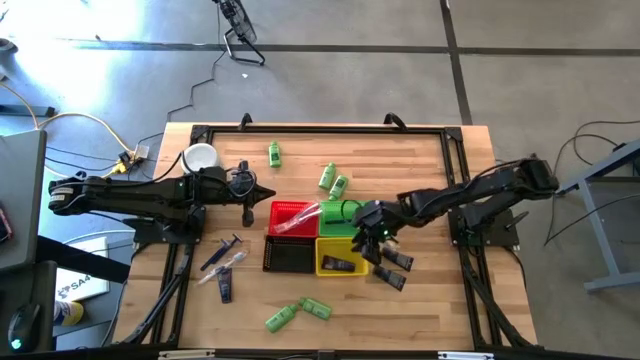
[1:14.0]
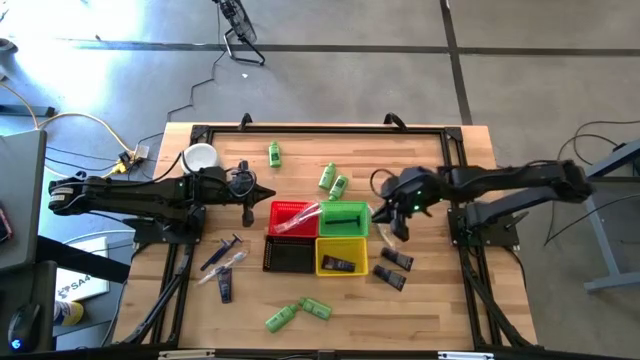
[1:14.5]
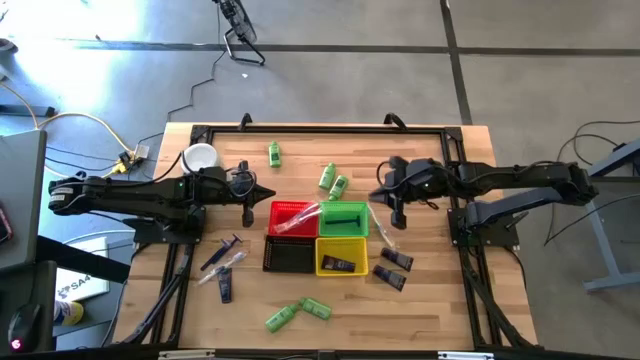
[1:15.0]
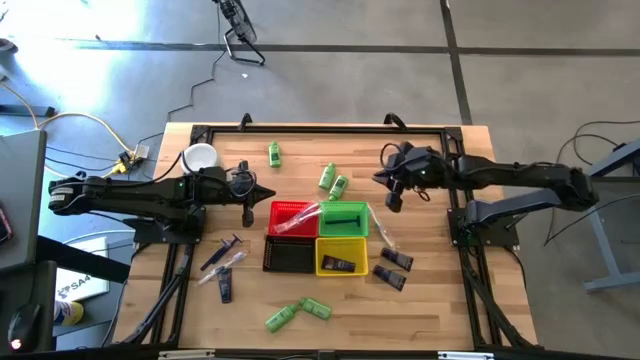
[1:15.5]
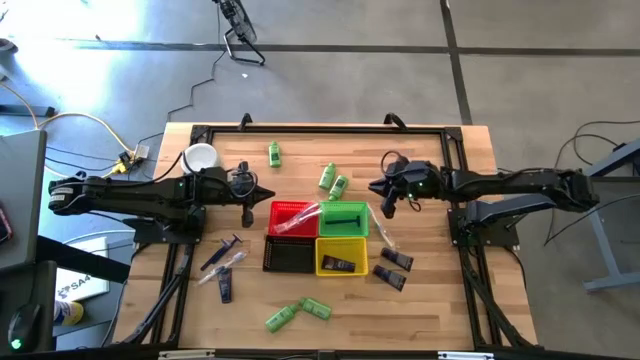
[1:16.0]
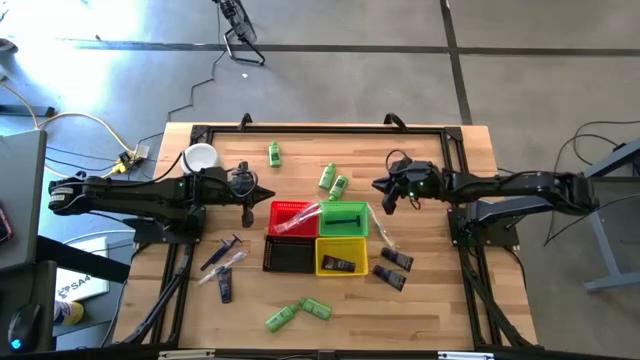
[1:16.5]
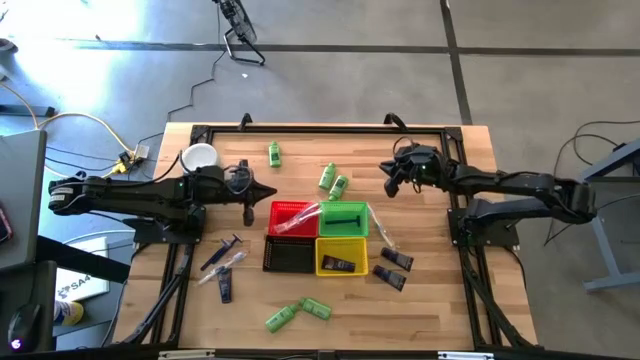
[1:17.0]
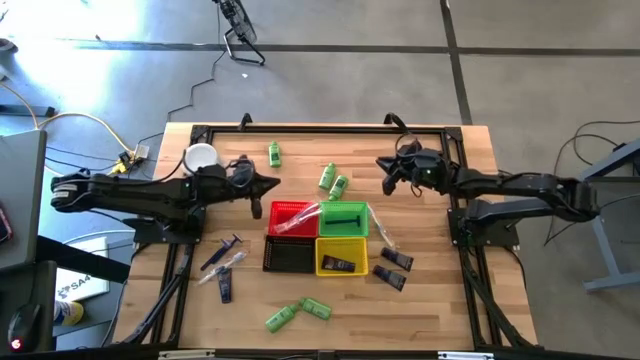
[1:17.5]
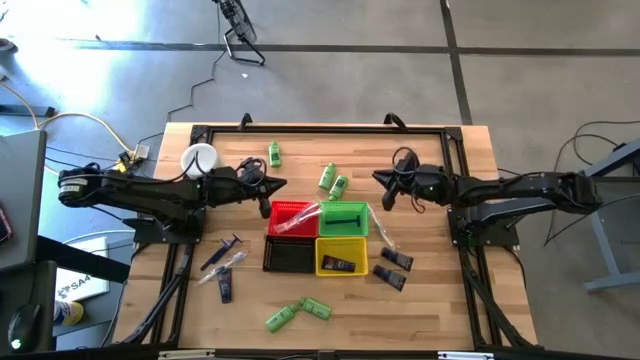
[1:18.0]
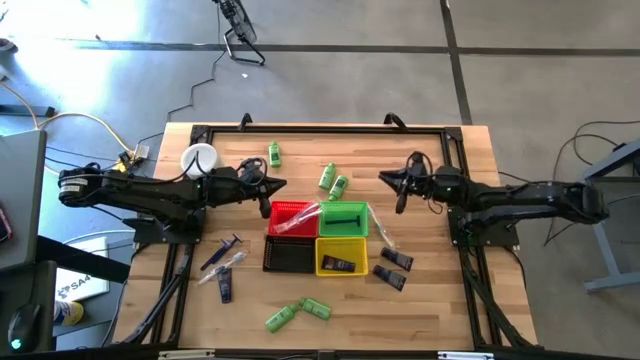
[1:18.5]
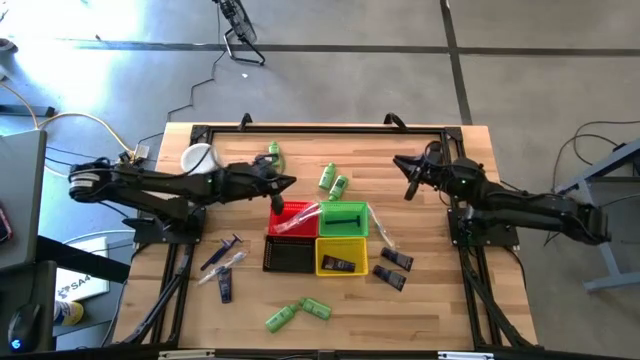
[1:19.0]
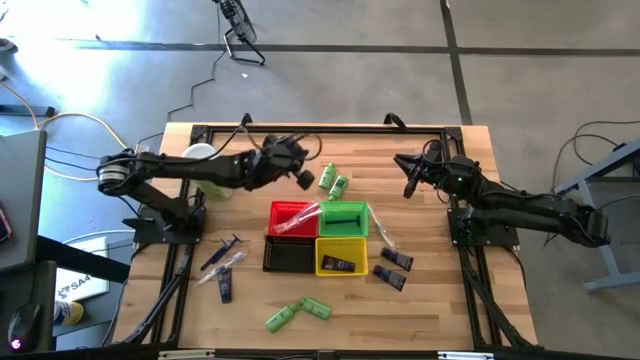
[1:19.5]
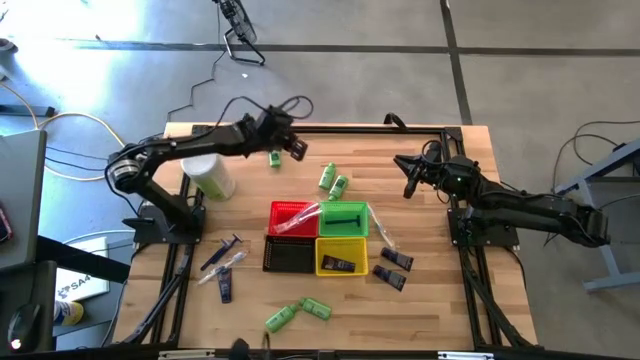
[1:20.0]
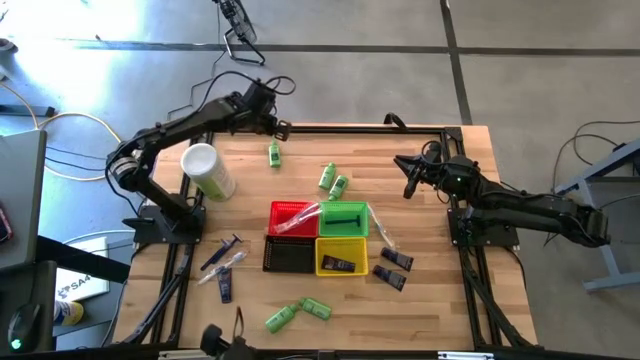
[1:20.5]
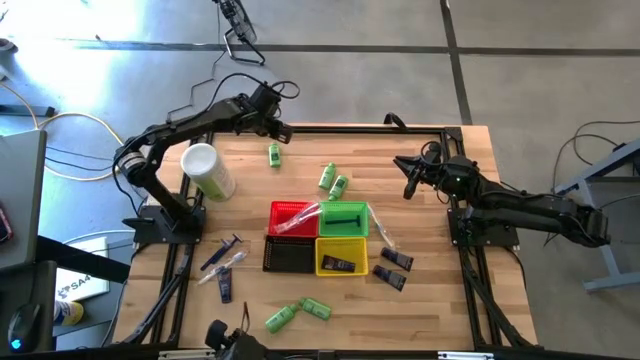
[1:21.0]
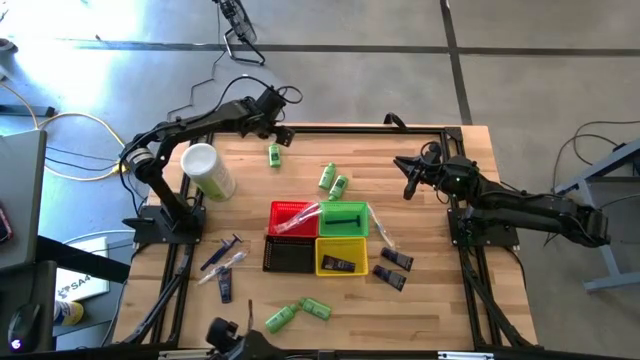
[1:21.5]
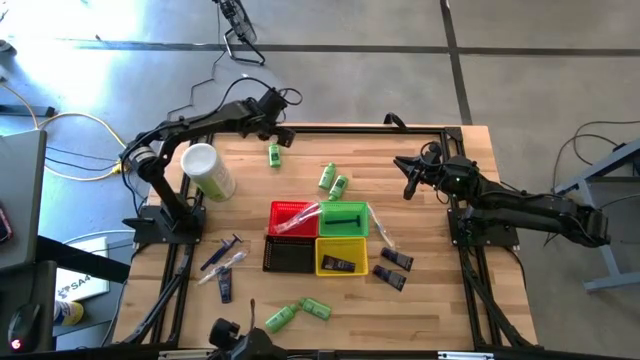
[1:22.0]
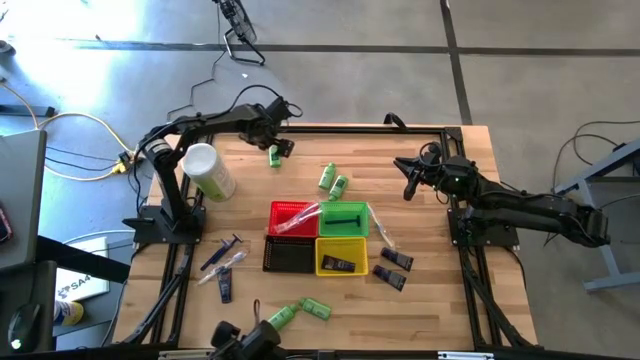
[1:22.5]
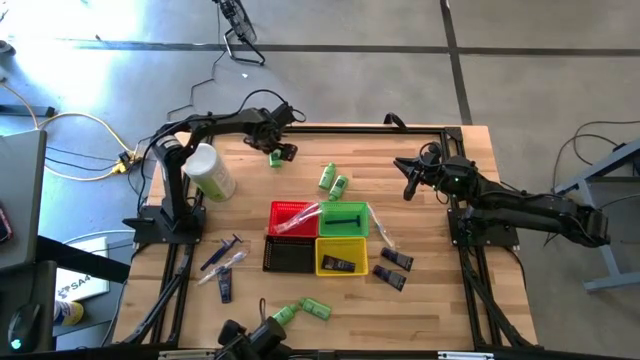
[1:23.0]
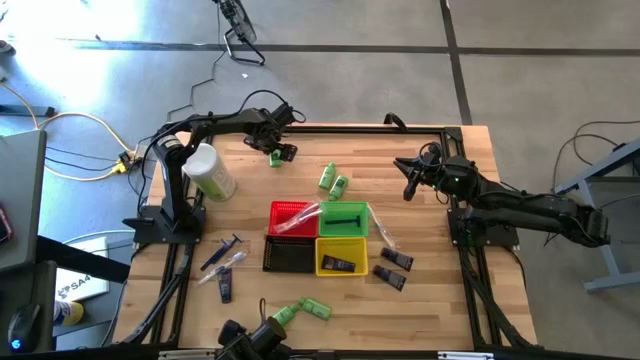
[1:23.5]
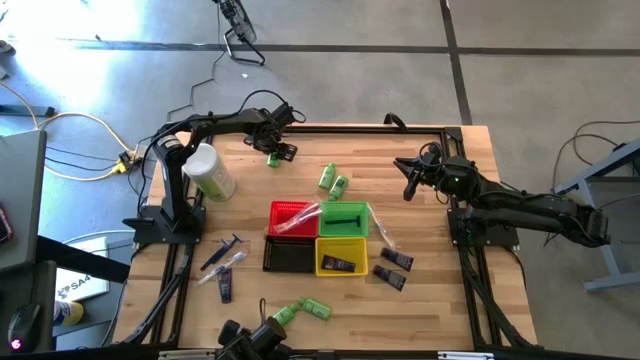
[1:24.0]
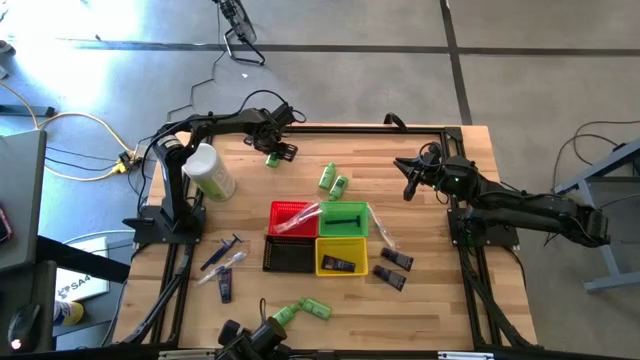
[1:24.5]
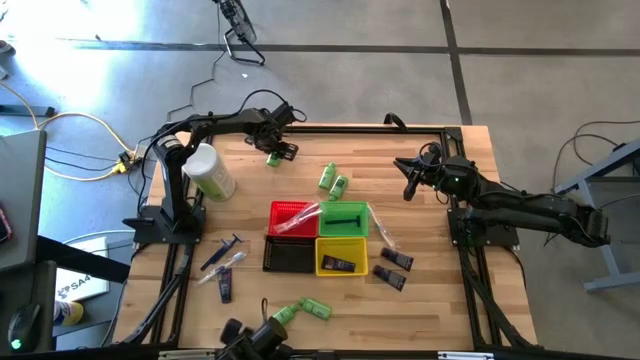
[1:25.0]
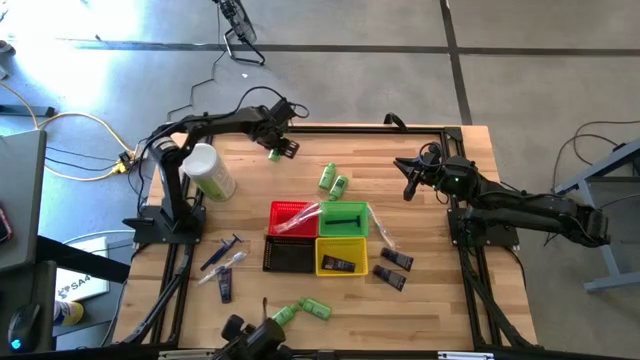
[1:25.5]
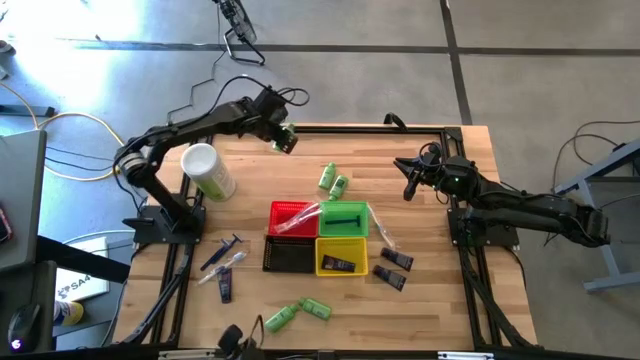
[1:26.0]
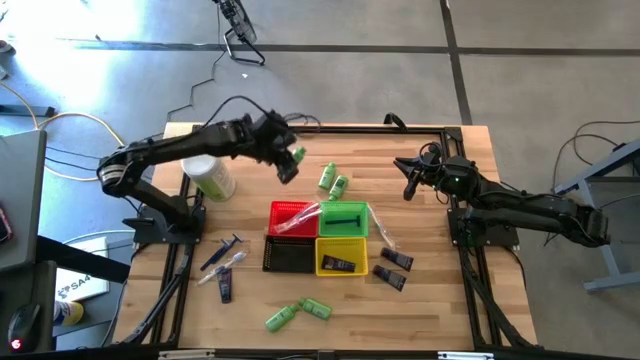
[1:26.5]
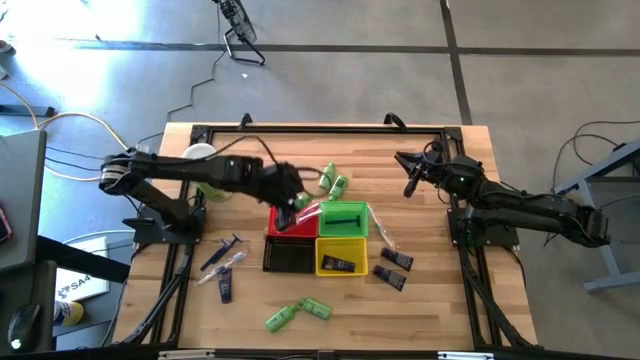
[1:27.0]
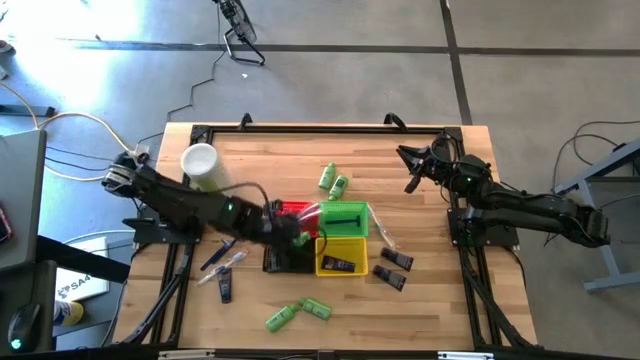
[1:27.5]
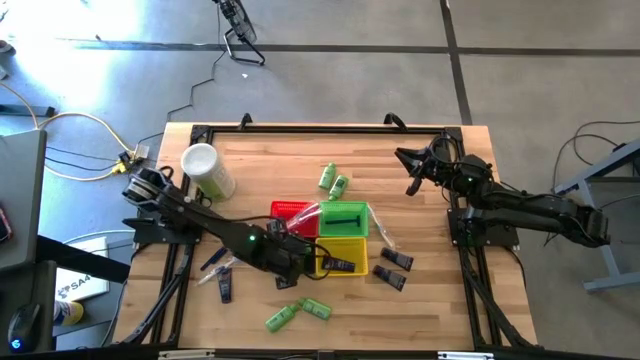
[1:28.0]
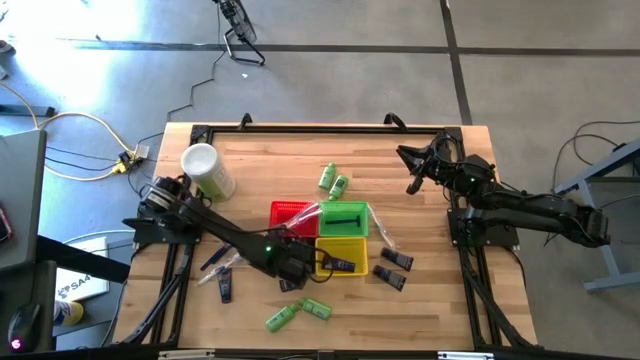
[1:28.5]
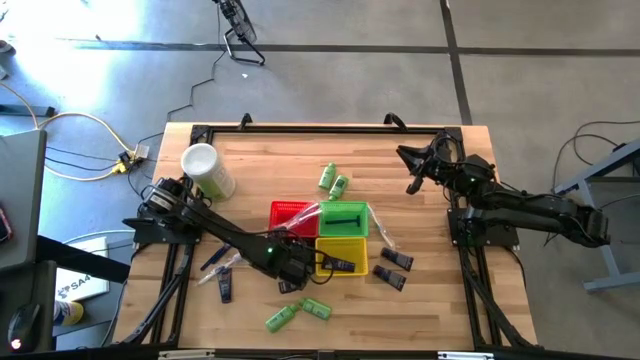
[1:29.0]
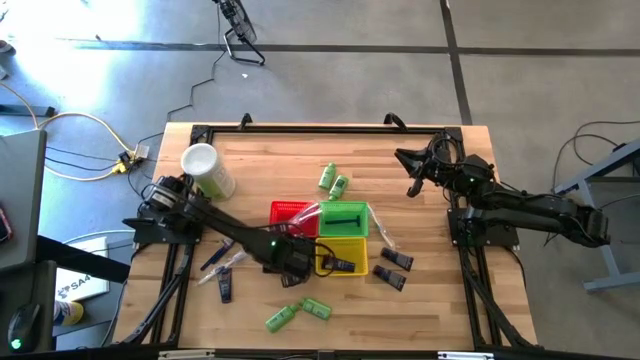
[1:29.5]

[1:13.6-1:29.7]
Task: Pick & Place Travel size toiletries
Put the green shampoo bottle into the black bin

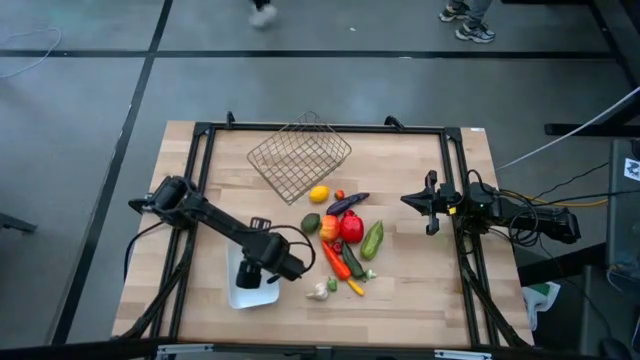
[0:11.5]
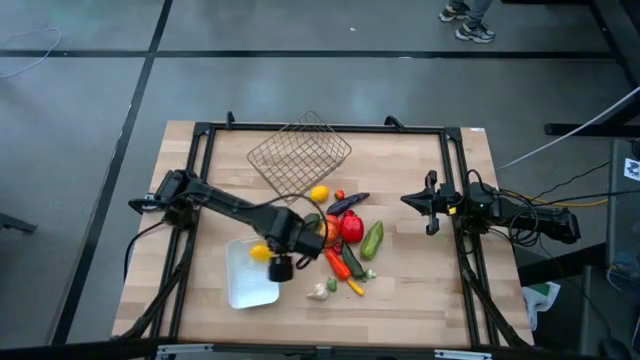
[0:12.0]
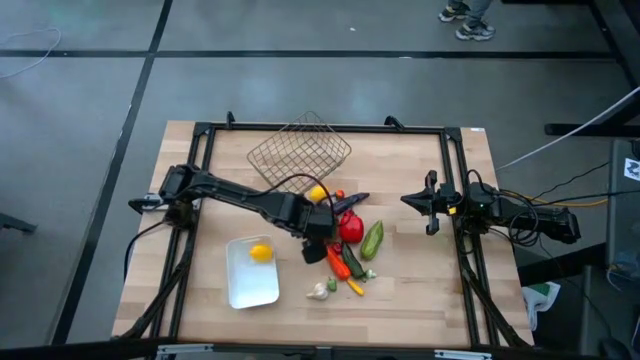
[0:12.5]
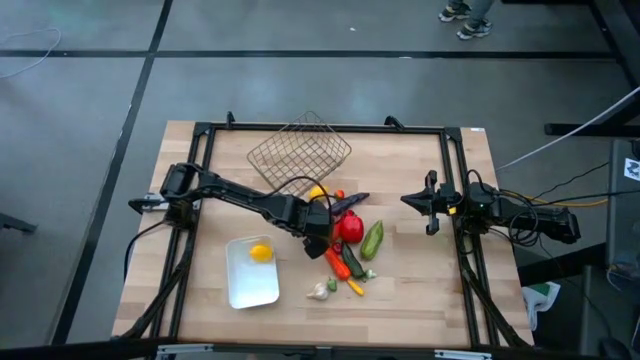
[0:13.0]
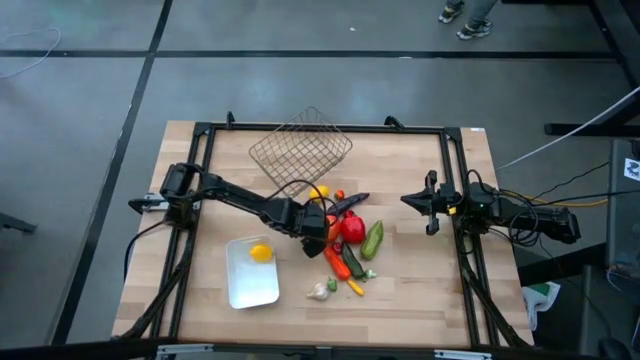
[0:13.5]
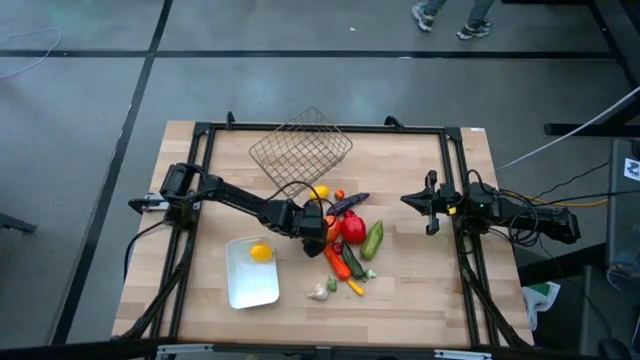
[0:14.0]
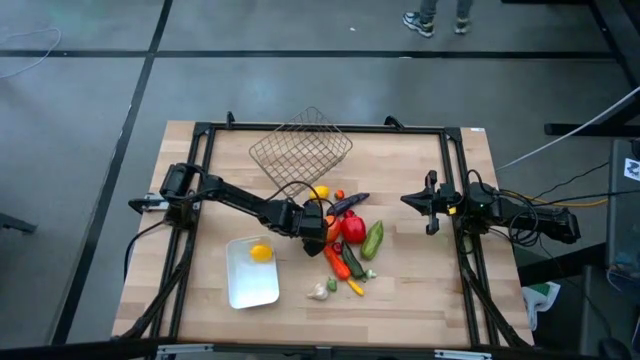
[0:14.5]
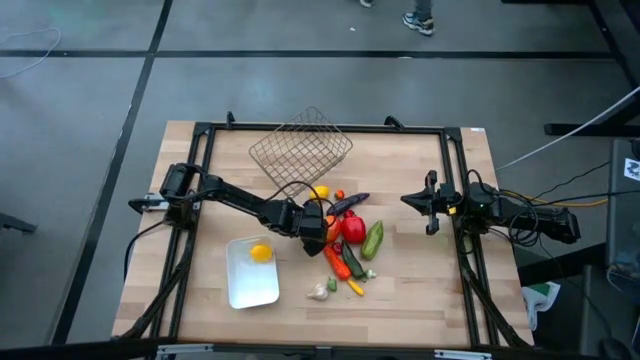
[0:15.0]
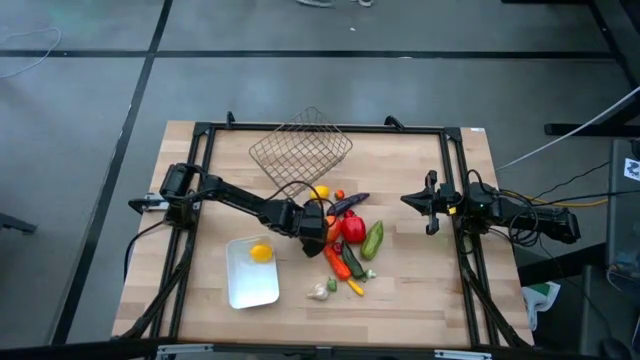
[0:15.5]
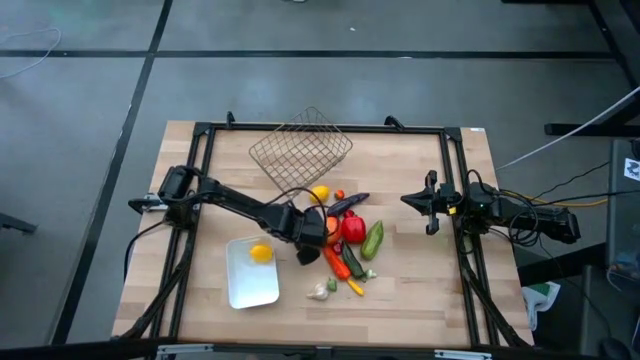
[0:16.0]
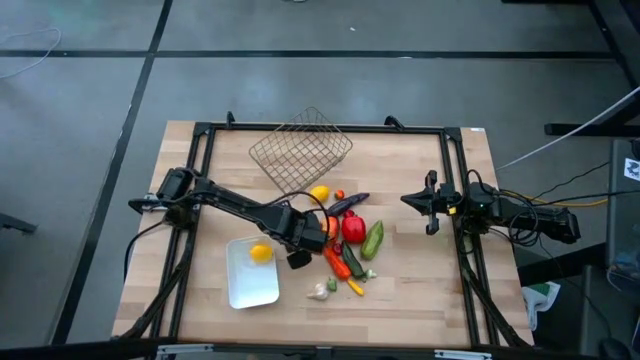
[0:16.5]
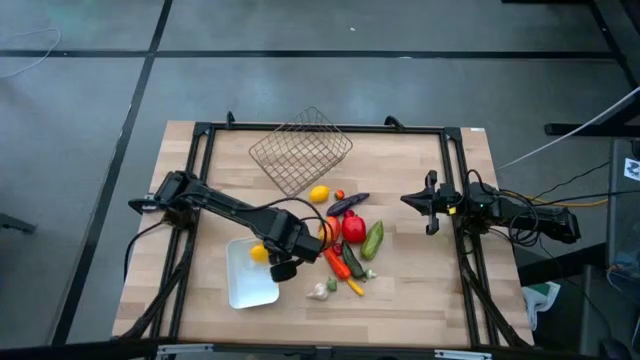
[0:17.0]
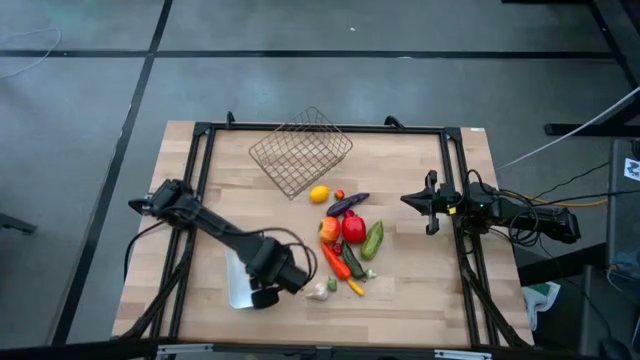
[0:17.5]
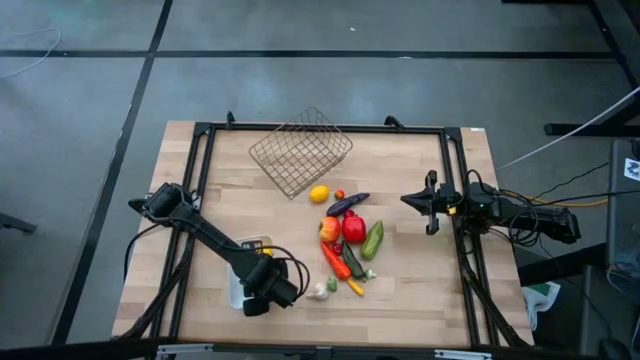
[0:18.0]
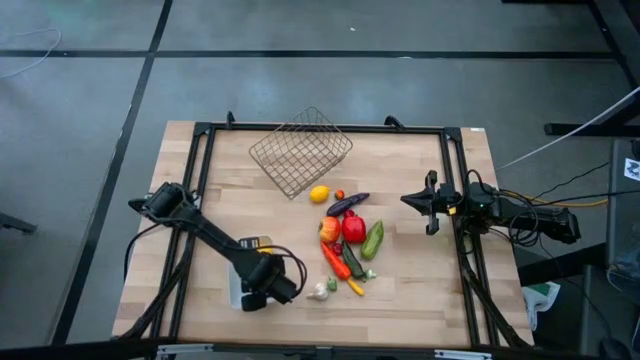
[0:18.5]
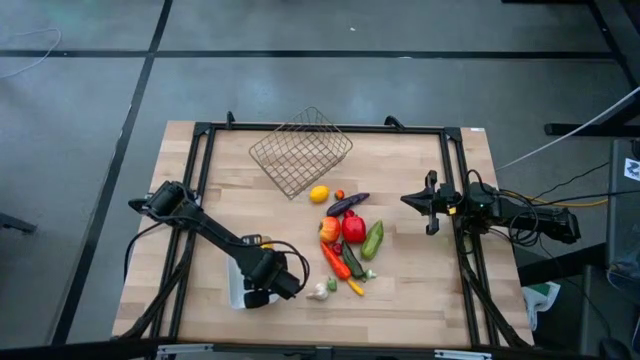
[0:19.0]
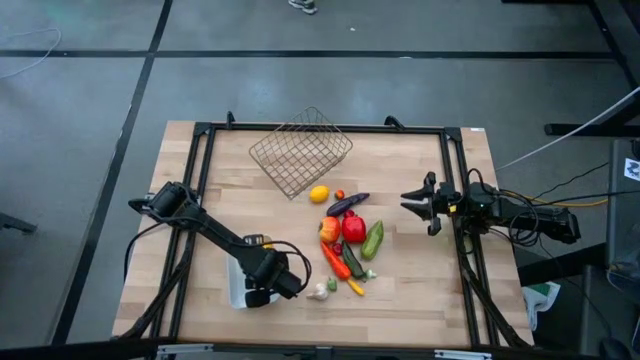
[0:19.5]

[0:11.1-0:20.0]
Task: Sort produce into baskets
Put the green lime into the white bin
